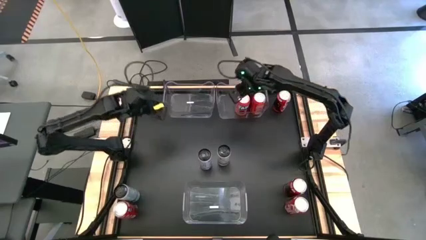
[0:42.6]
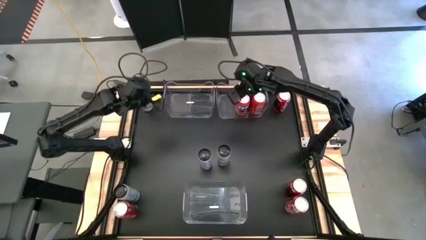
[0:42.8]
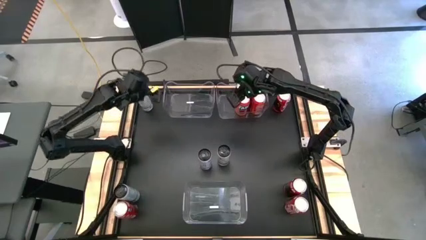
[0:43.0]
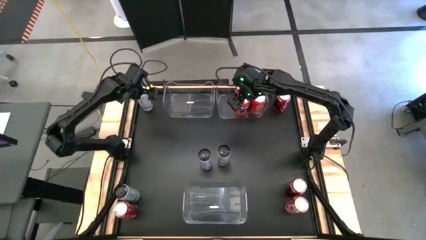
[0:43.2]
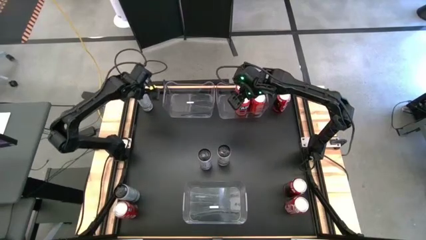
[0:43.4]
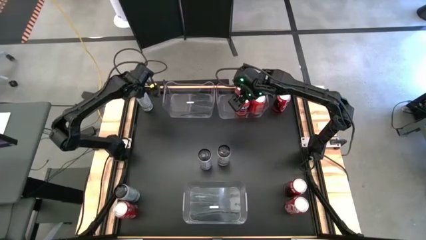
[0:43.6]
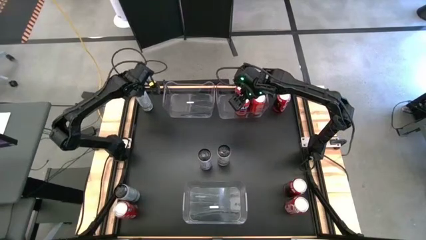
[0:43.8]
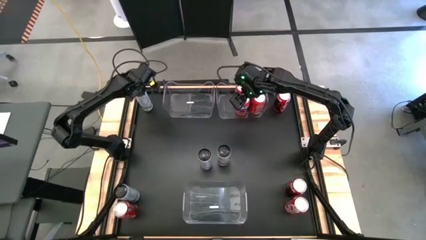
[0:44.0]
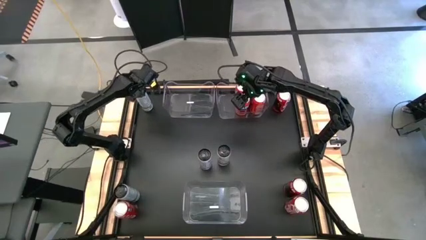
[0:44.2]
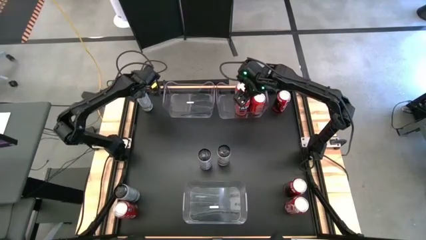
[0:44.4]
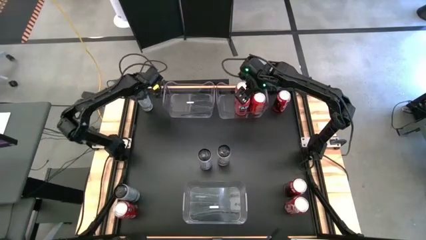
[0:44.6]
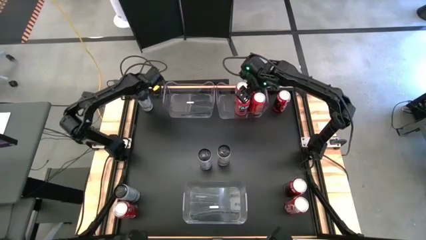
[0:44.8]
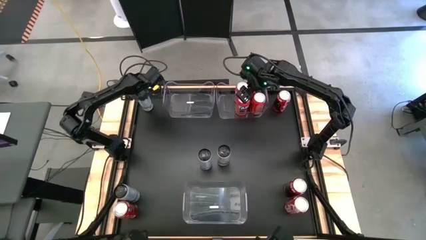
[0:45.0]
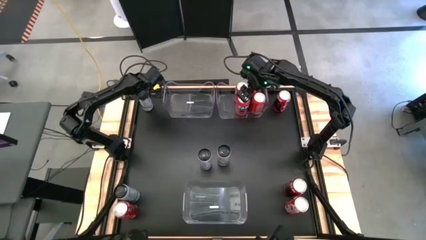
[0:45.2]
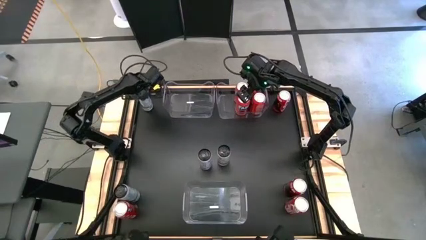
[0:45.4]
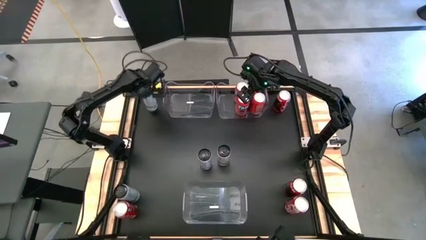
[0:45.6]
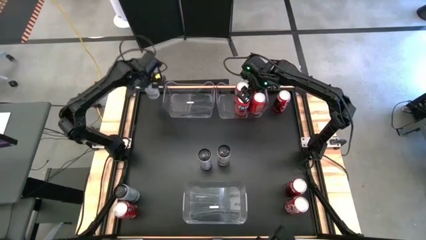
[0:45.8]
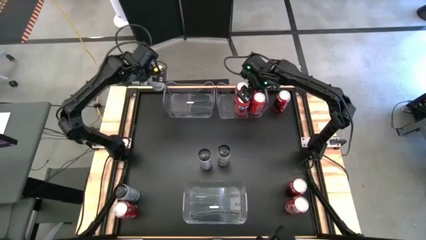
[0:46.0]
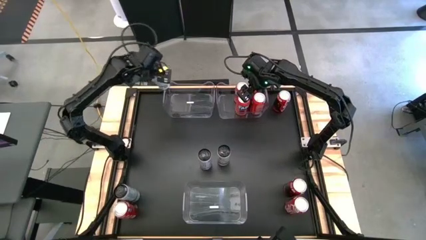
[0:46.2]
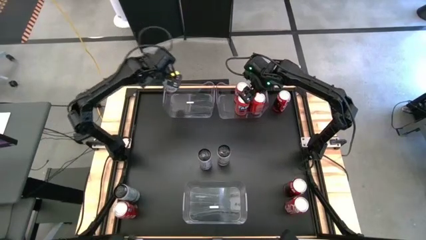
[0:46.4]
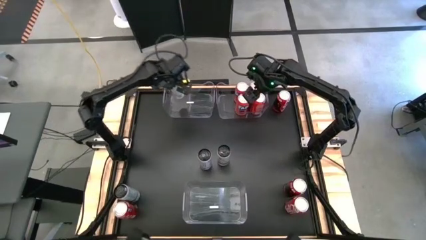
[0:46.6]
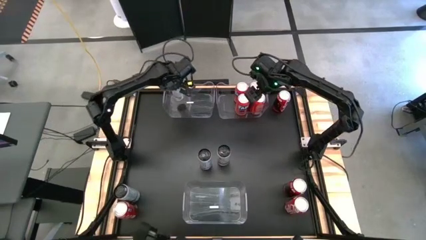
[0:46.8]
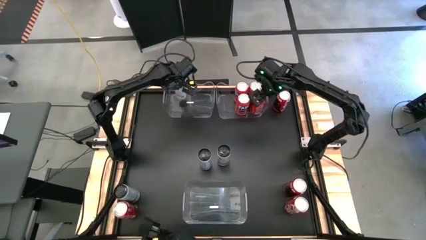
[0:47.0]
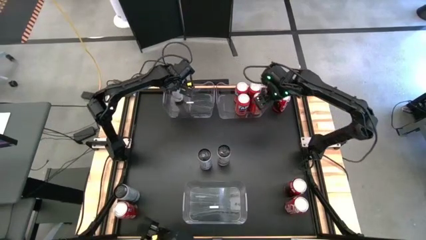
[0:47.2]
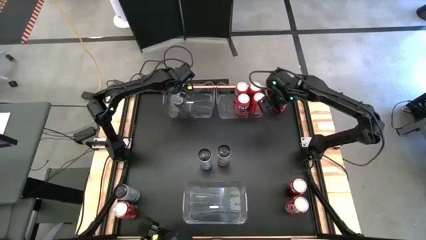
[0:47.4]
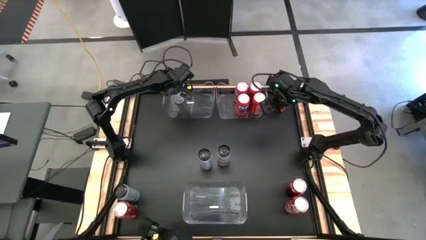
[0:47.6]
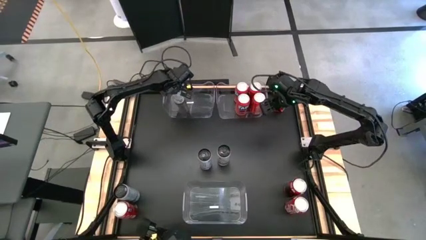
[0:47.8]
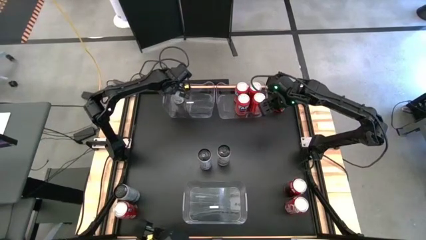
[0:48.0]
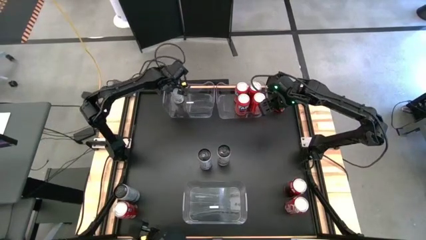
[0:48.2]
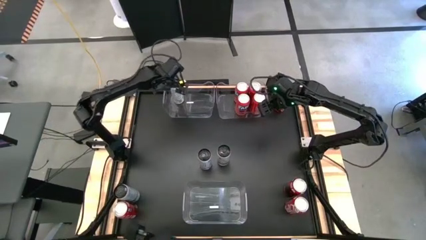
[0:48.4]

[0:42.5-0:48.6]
Task: Sort soda cans
Put the top white soda can into the top left transparent bin

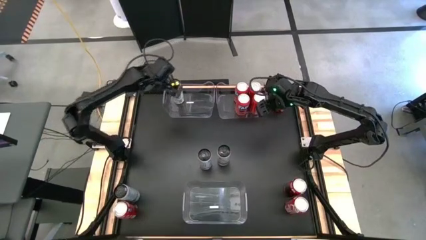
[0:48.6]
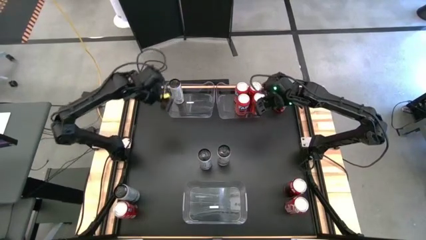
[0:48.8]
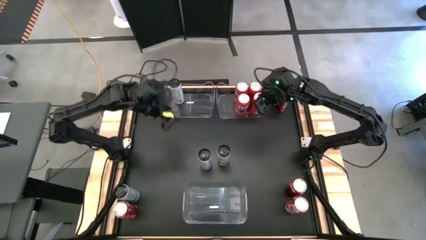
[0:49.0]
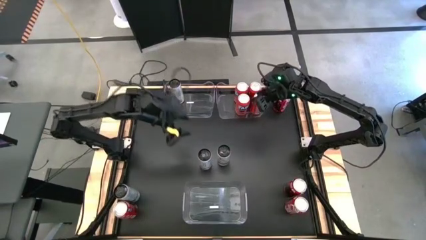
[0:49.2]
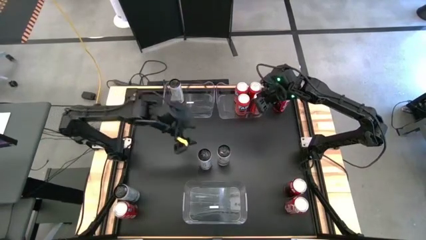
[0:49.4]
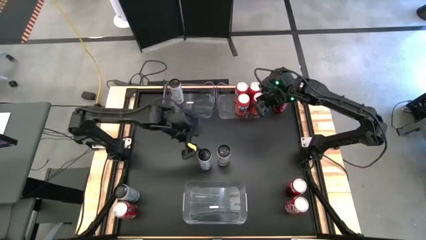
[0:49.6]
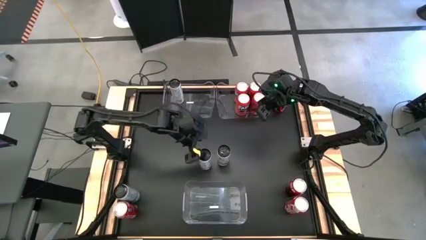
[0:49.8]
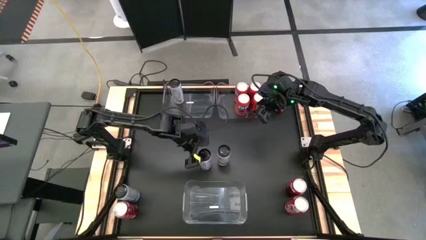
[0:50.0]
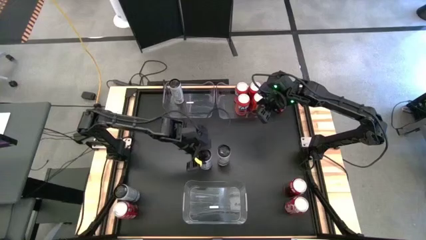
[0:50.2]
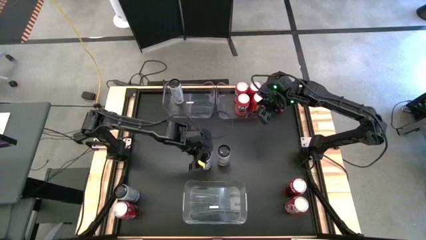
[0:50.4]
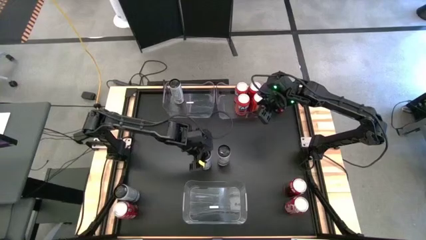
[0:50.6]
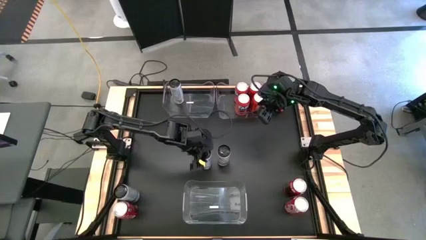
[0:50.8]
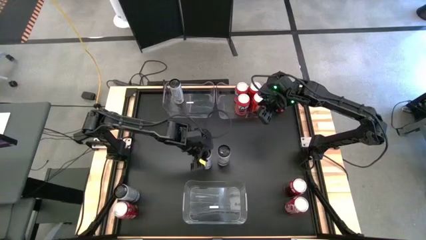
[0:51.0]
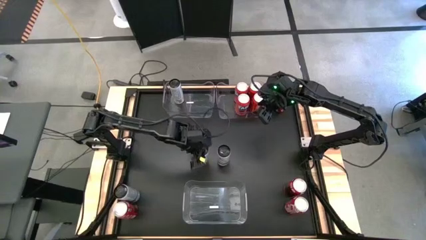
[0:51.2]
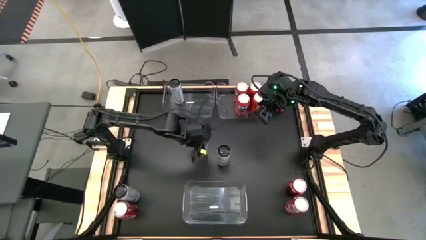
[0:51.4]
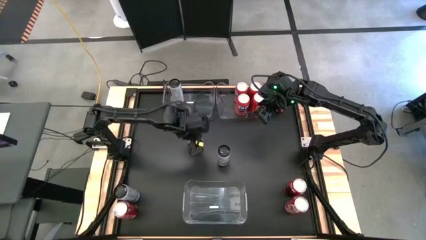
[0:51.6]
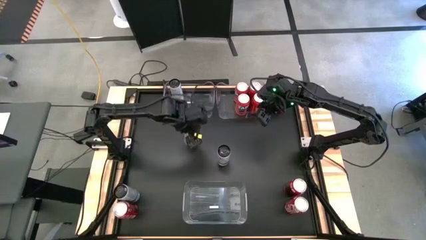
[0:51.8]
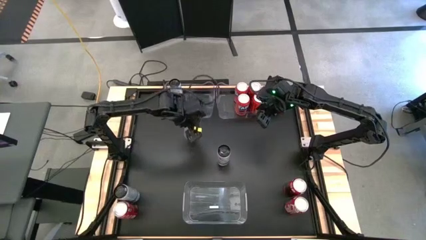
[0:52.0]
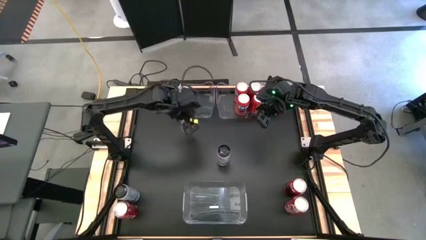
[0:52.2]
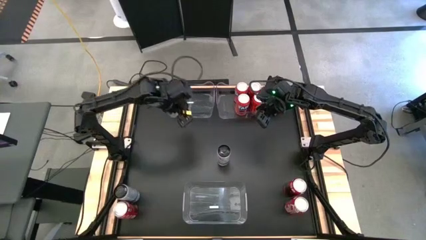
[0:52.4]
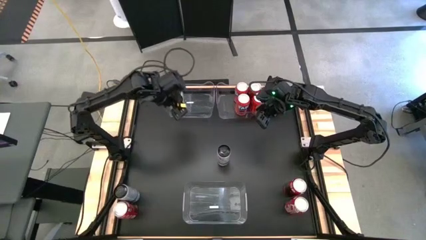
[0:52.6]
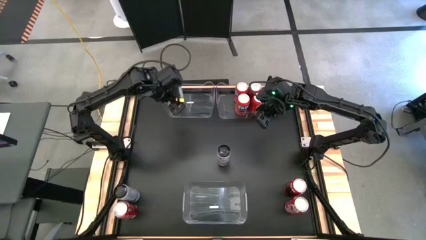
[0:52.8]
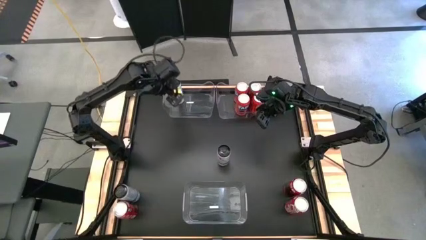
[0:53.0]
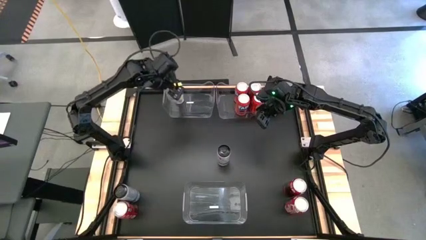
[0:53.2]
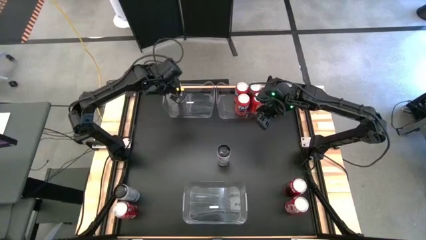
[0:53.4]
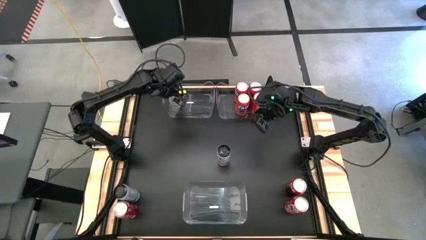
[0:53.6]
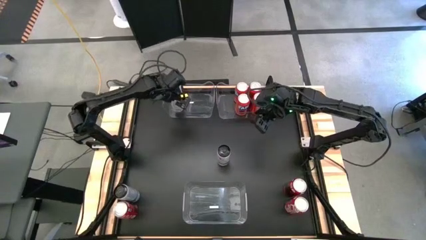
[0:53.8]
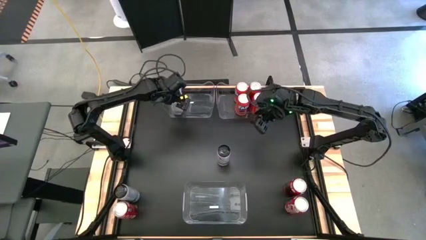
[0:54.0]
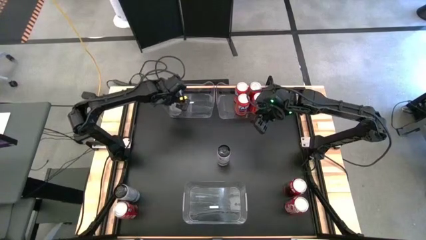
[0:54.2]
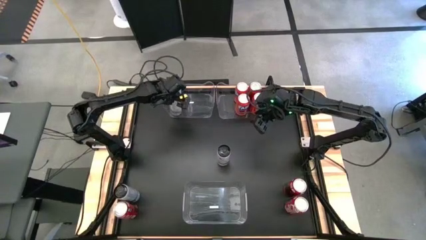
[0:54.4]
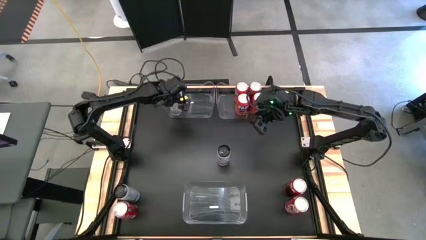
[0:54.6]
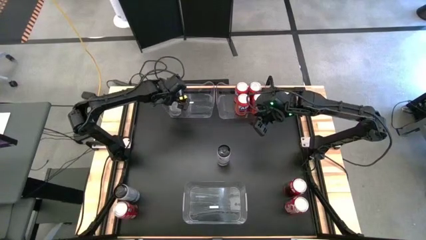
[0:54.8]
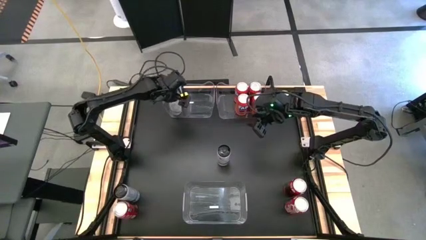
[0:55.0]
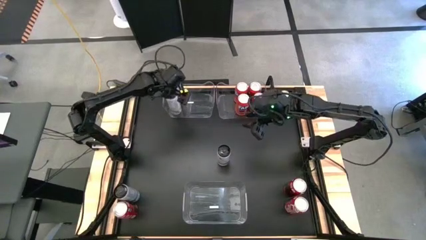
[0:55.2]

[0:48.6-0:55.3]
Put the top right white soda can into the top left transparent bin
